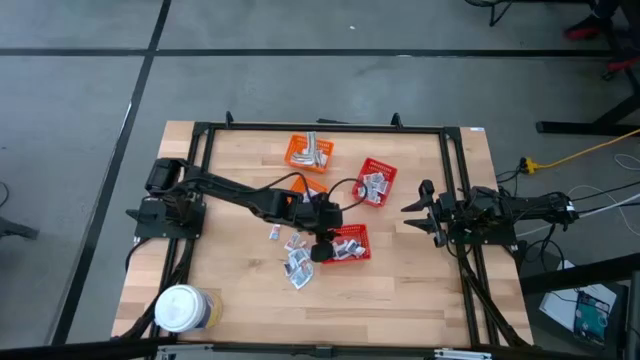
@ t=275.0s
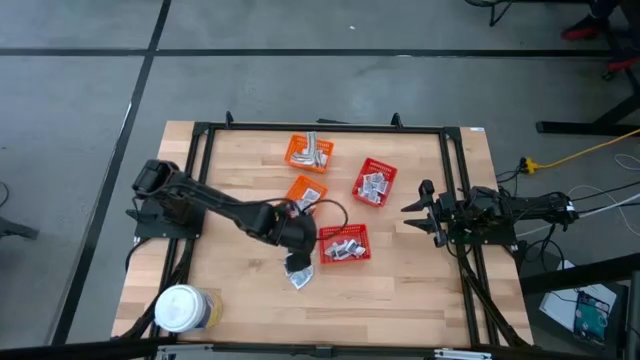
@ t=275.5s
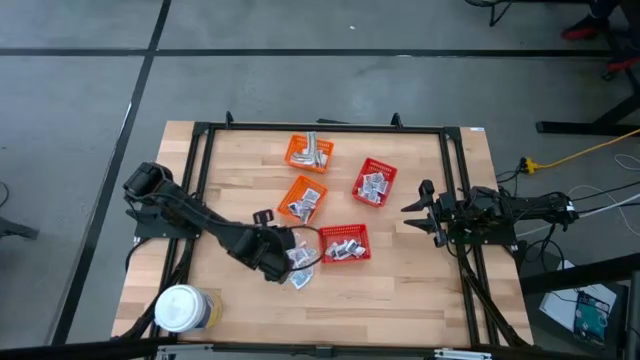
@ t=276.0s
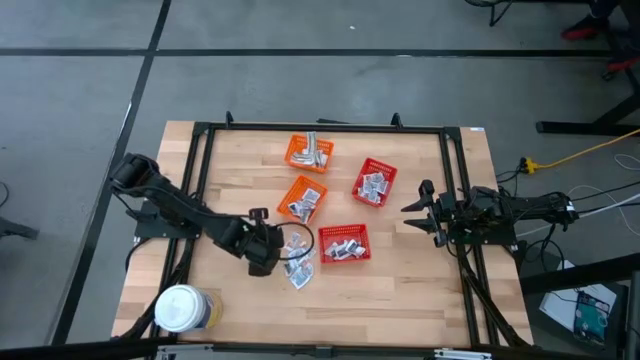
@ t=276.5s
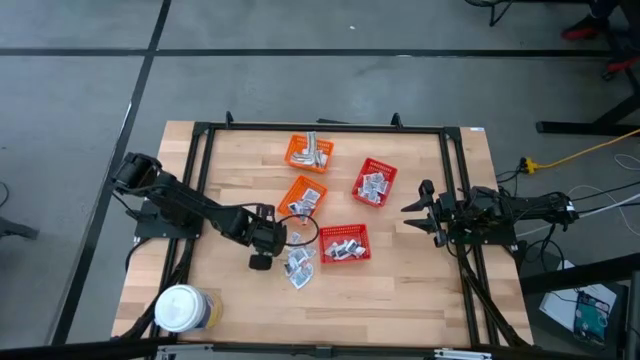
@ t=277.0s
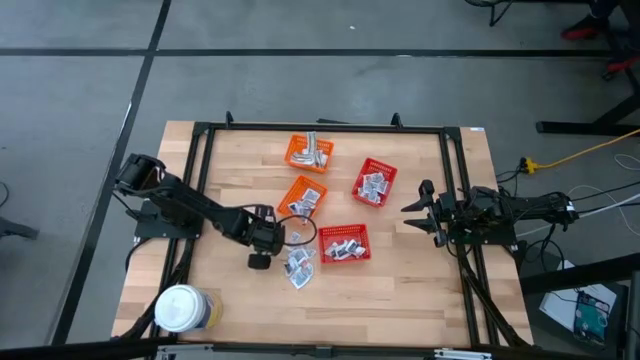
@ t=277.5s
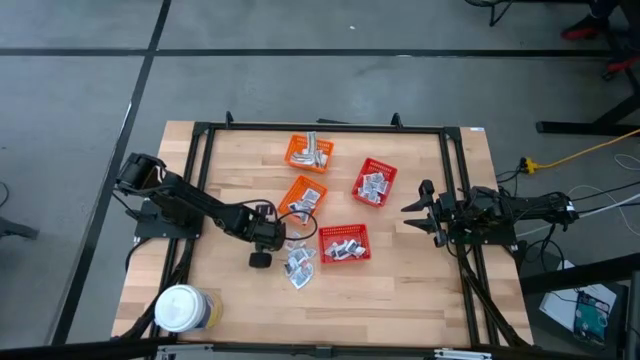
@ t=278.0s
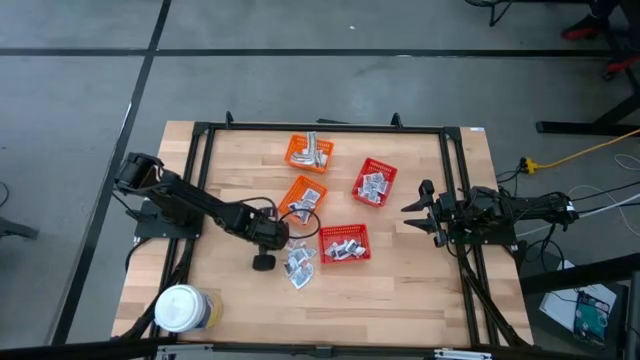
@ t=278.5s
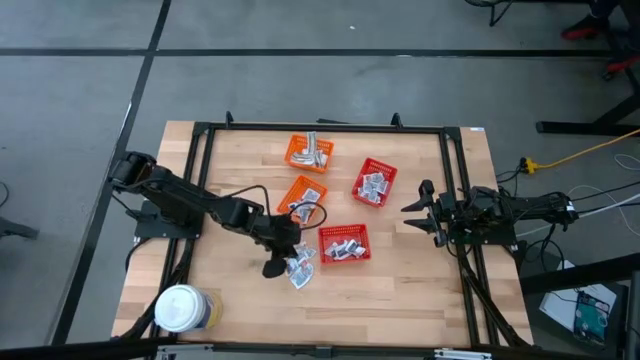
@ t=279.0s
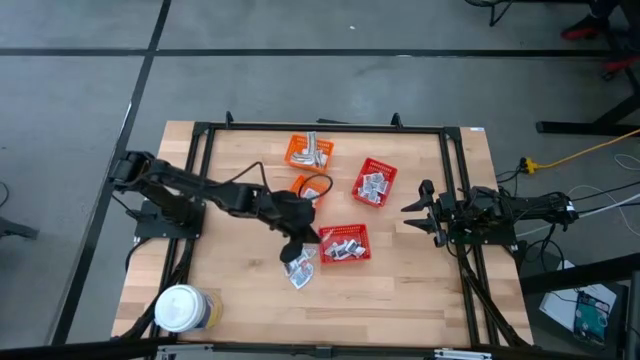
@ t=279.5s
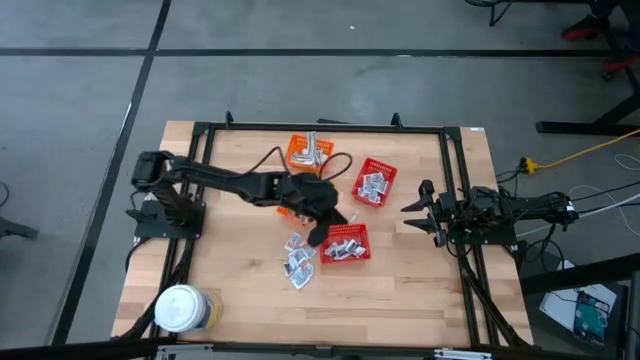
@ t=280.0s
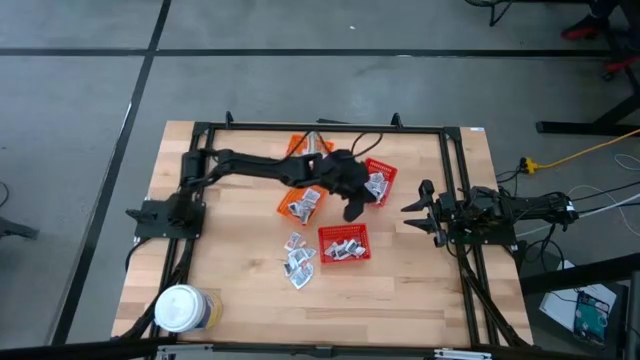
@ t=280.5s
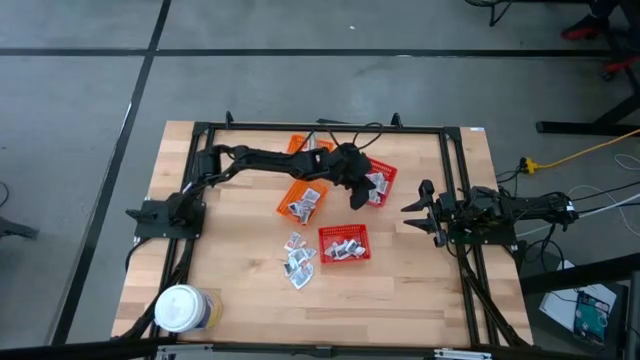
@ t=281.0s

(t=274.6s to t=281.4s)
Task: Pick & Place First Aid Supplies
Put the orange ointment pack into the top red bin

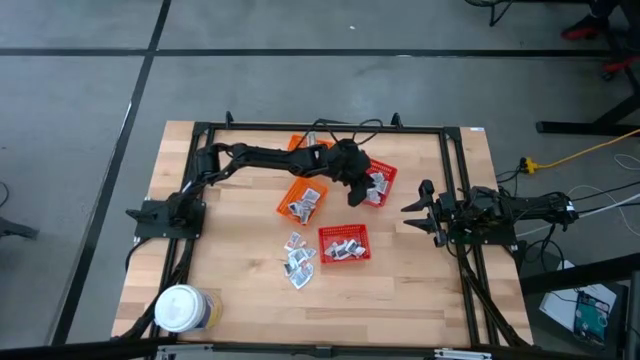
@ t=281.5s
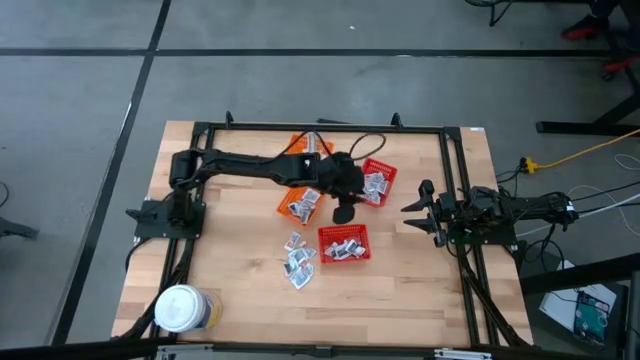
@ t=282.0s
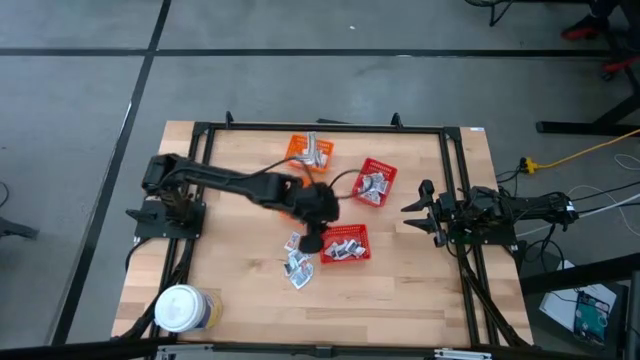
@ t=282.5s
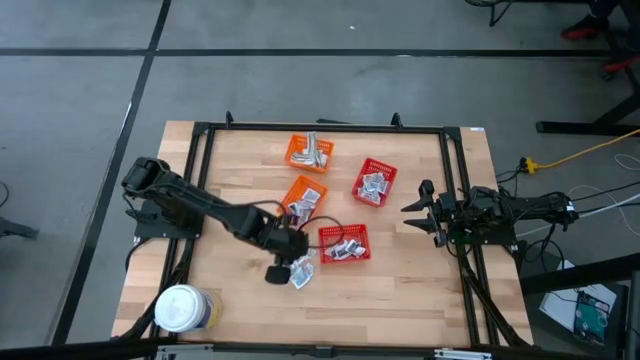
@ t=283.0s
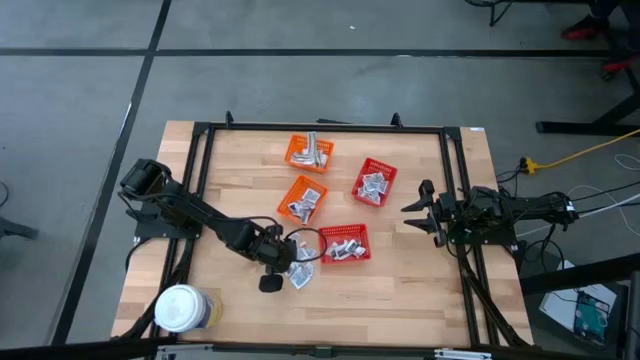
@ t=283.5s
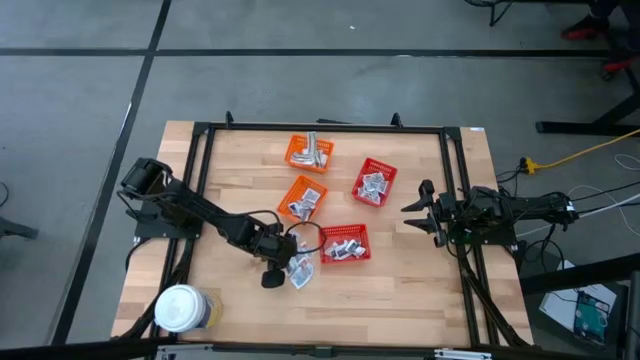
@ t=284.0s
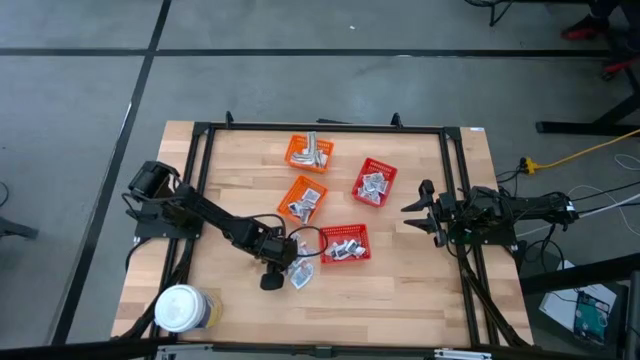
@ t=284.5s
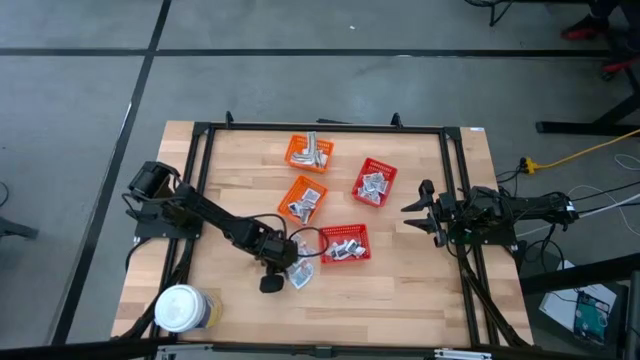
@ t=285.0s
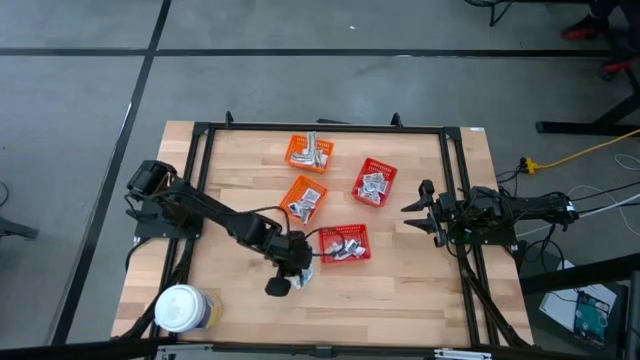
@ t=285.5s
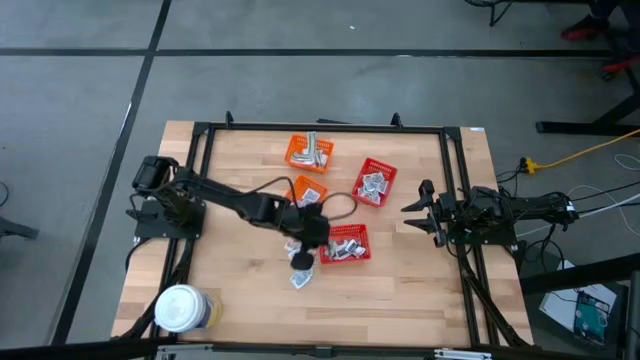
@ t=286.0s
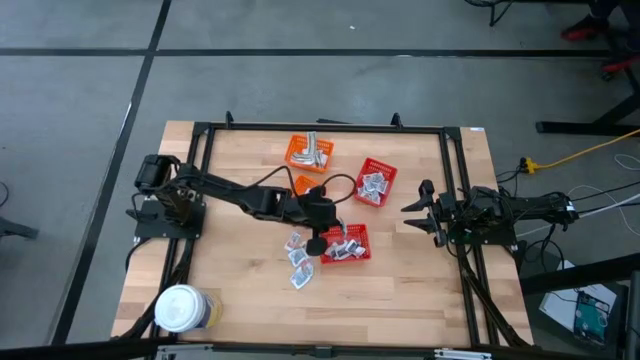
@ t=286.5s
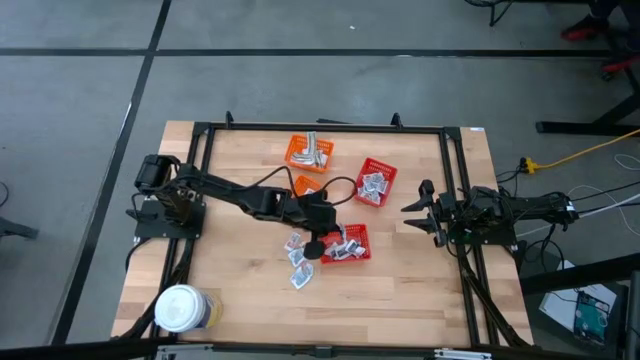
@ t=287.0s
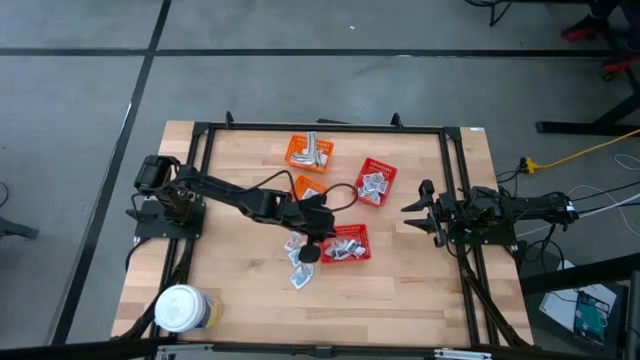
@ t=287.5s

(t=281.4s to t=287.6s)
Put the gray towelette pack into the bottom red bin

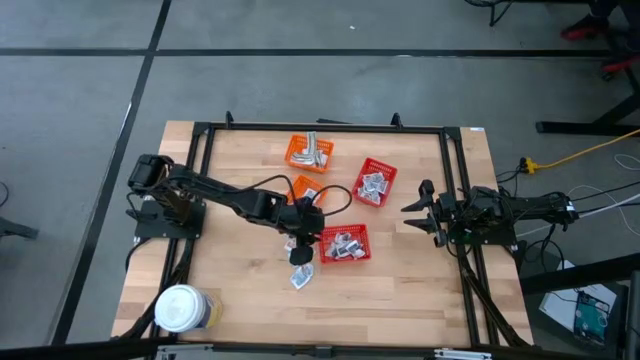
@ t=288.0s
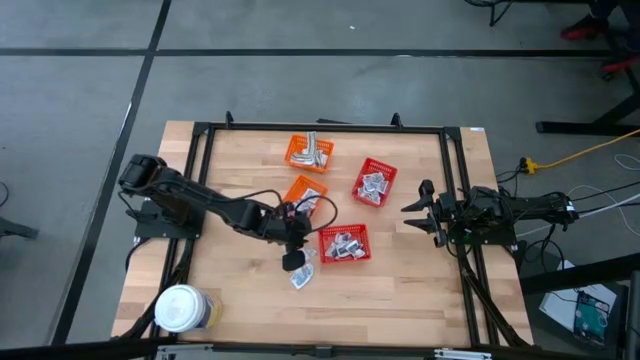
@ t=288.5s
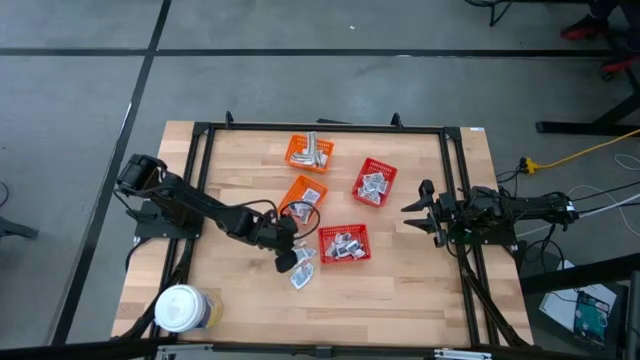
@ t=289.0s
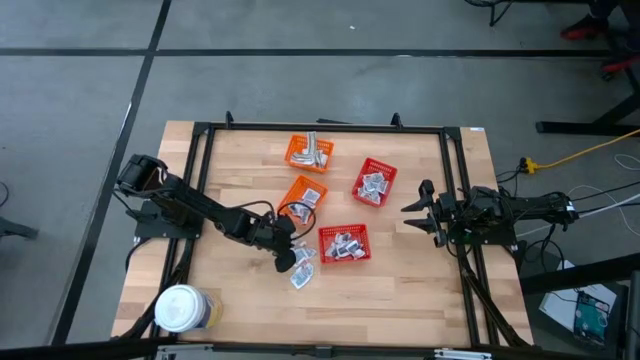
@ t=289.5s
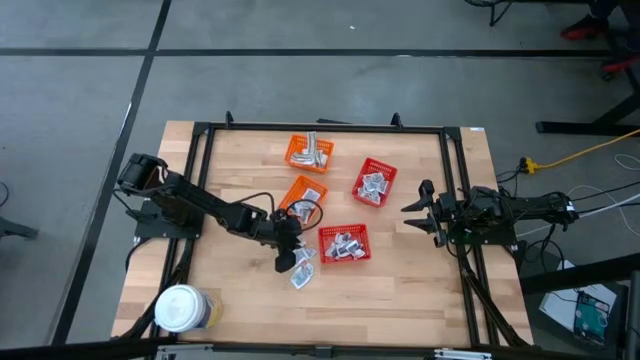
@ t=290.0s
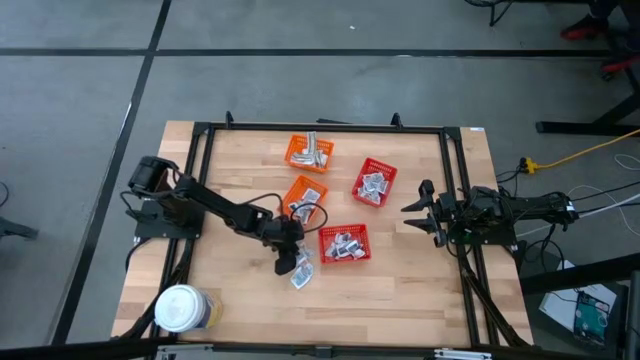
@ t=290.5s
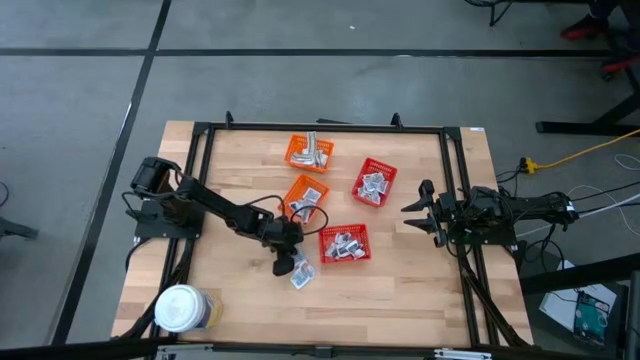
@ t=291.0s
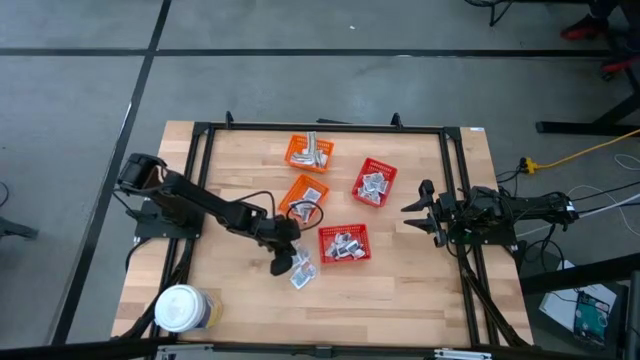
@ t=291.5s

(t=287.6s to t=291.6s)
Put the gray towelette pack into the bottom red bin

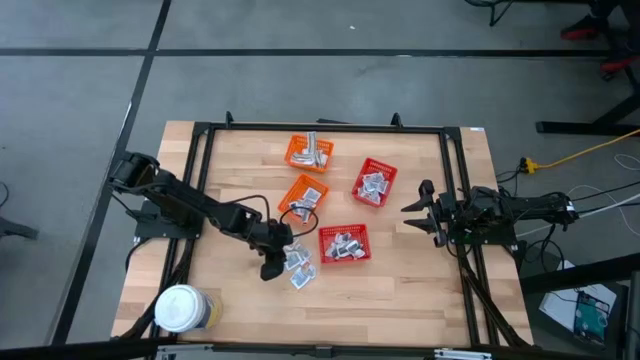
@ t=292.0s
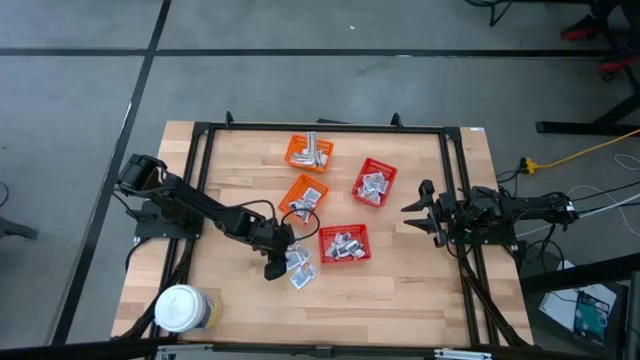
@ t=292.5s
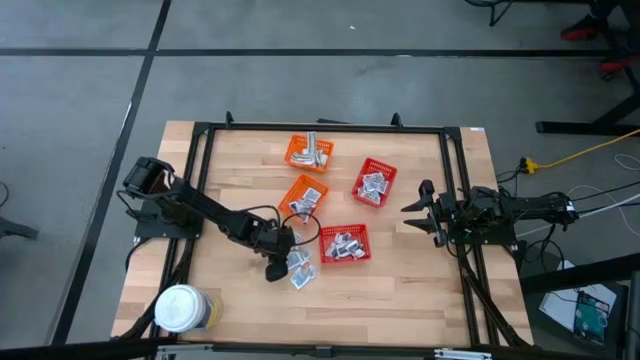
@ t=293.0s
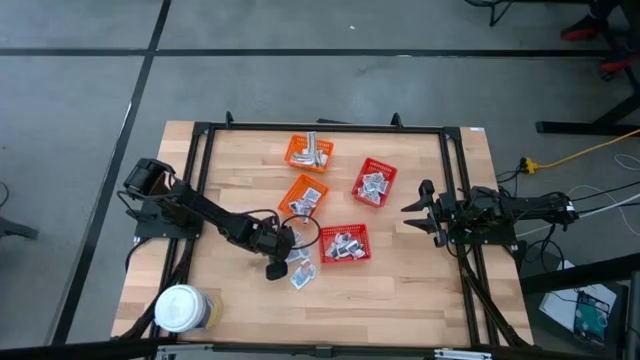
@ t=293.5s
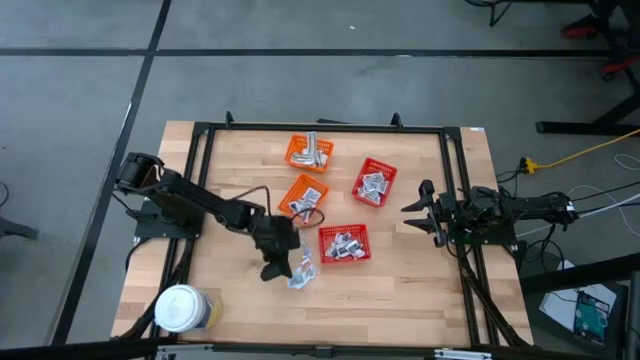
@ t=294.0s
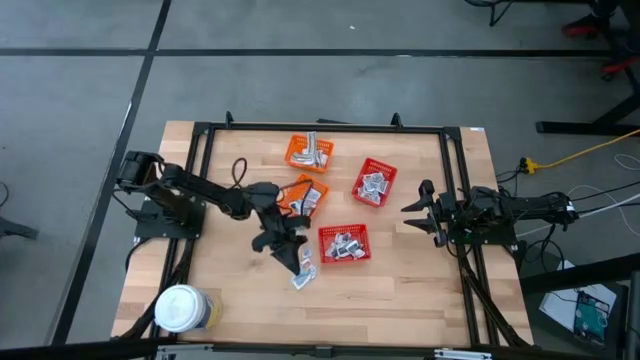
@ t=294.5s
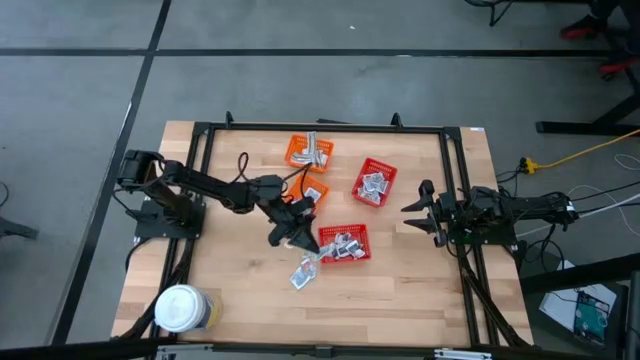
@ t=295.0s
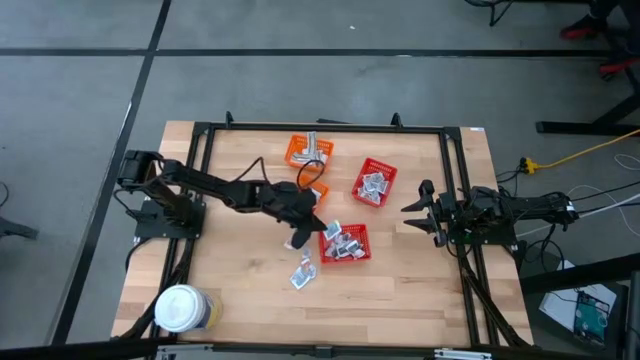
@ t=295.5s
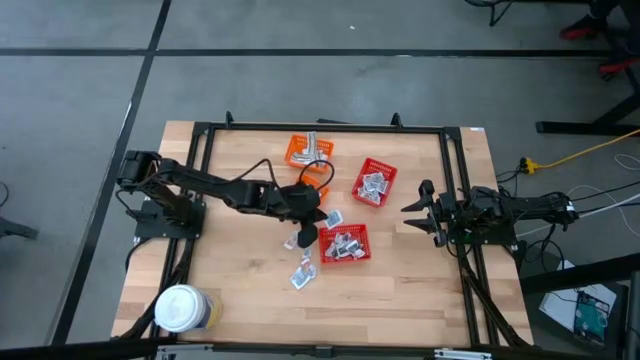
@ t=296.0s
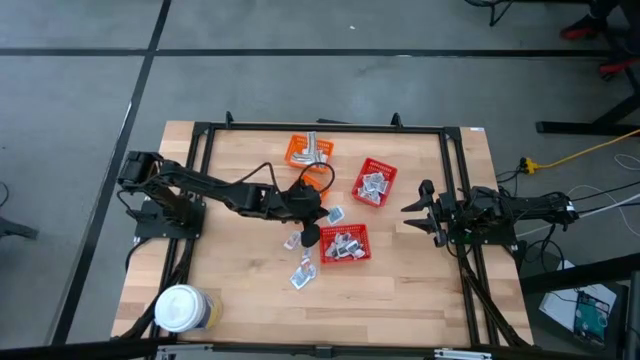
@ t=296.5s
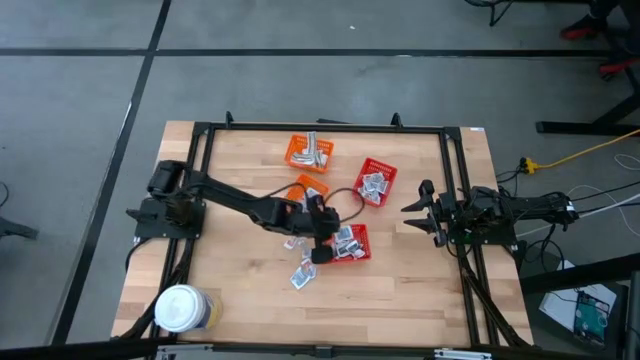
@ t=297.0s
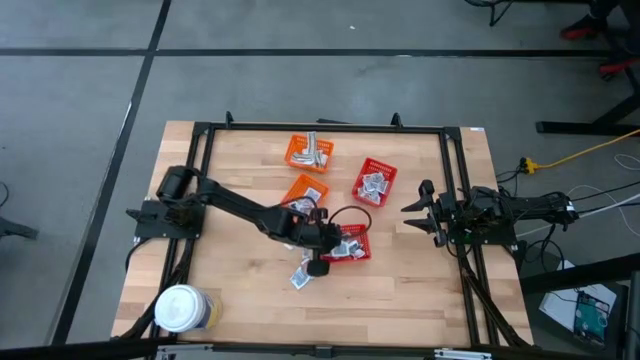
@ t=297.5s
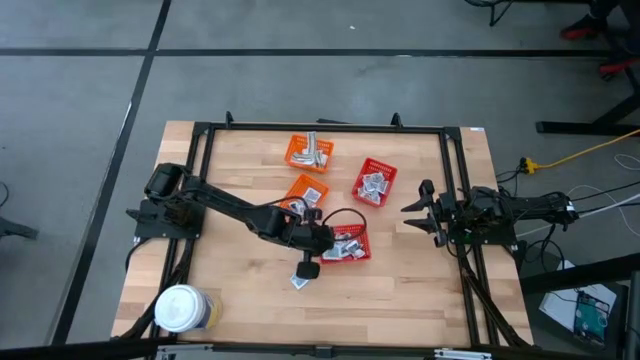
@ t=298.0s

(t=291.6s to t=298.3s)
Put the gray towelette pack into the bottom red bin
